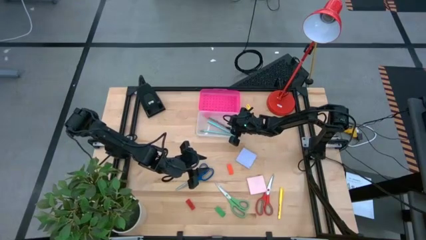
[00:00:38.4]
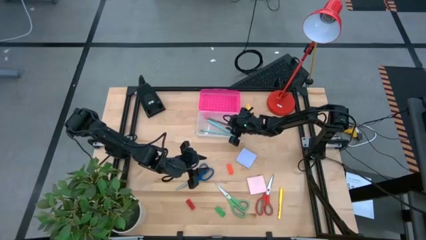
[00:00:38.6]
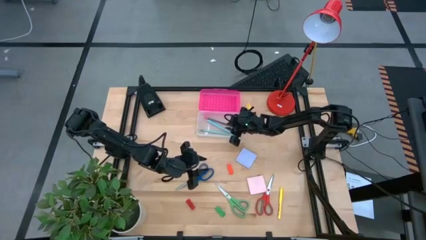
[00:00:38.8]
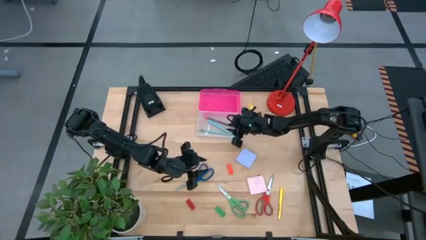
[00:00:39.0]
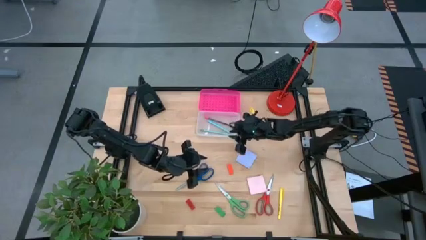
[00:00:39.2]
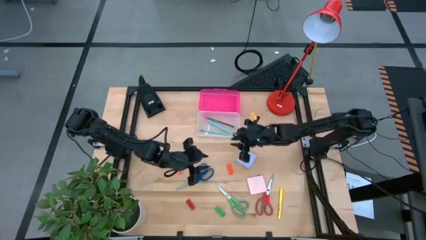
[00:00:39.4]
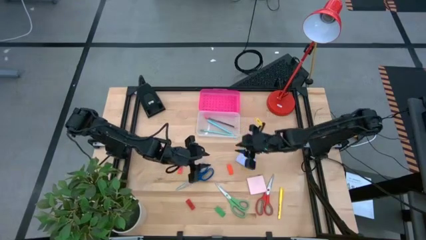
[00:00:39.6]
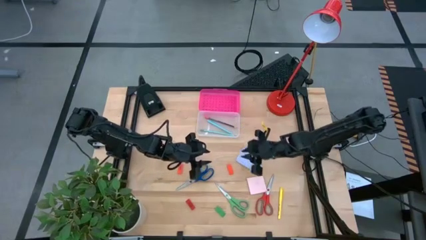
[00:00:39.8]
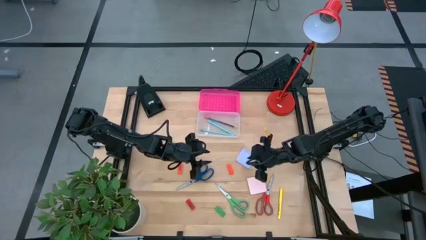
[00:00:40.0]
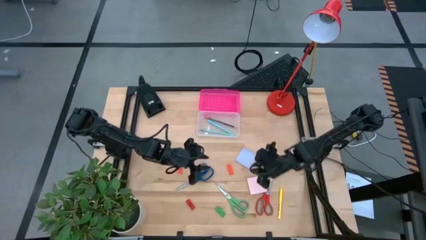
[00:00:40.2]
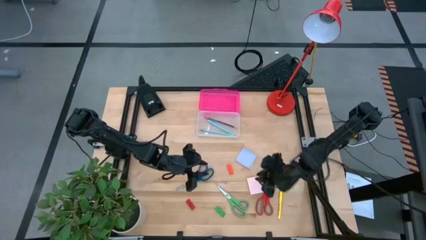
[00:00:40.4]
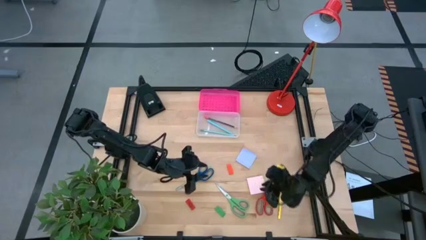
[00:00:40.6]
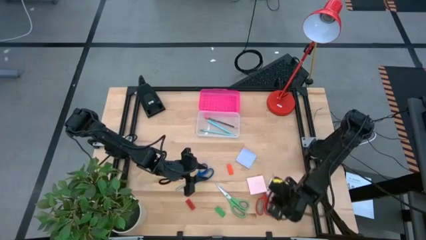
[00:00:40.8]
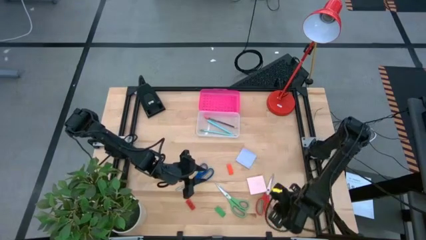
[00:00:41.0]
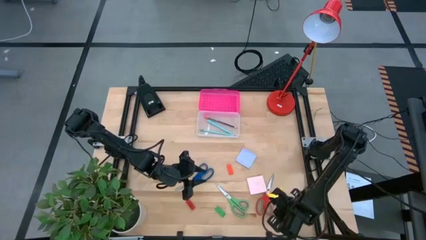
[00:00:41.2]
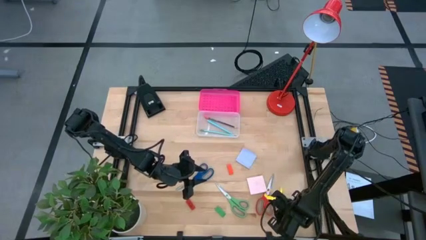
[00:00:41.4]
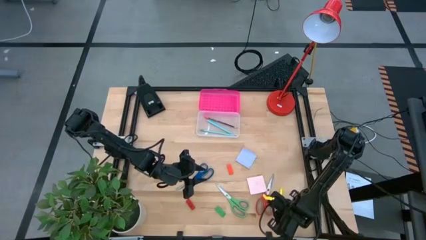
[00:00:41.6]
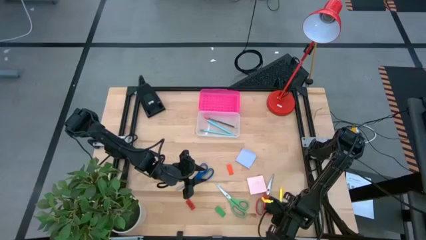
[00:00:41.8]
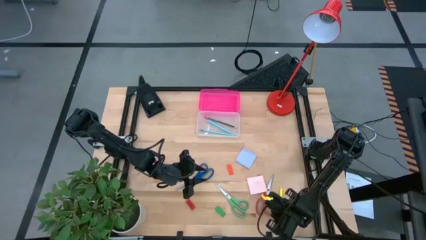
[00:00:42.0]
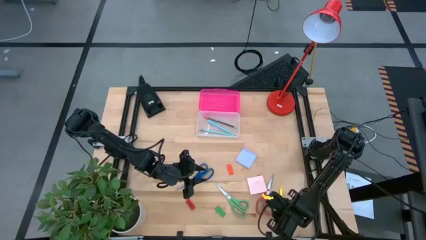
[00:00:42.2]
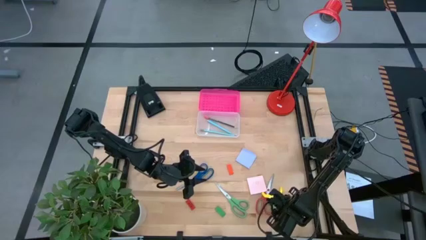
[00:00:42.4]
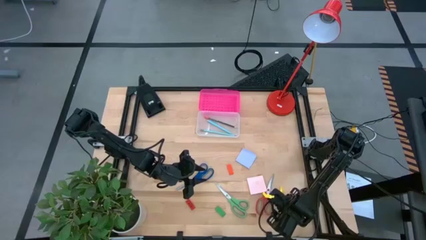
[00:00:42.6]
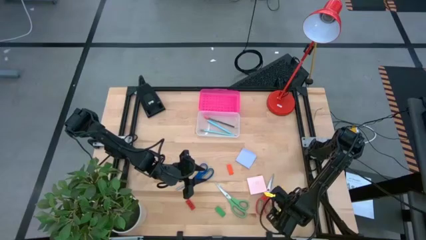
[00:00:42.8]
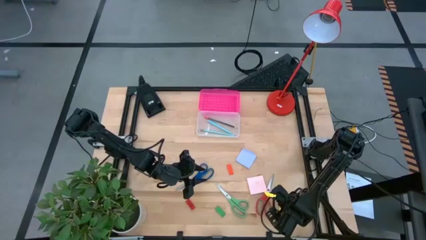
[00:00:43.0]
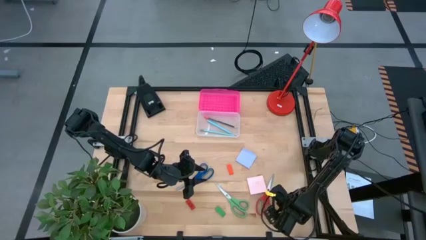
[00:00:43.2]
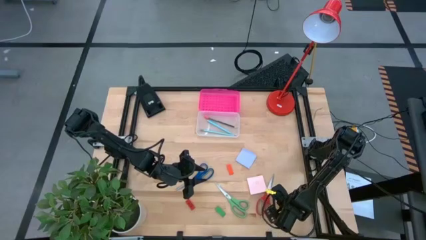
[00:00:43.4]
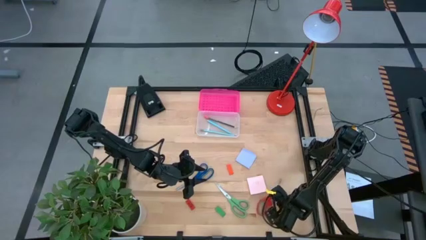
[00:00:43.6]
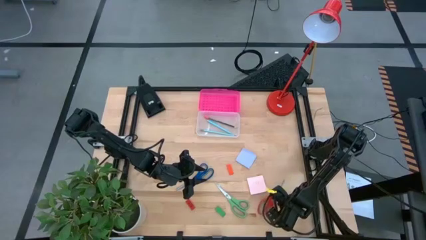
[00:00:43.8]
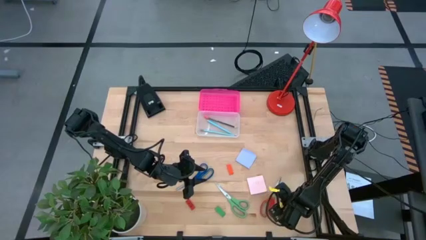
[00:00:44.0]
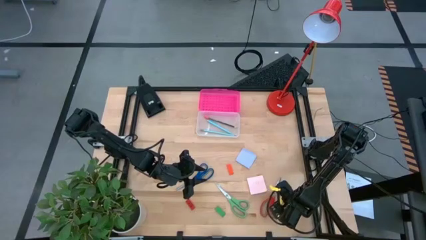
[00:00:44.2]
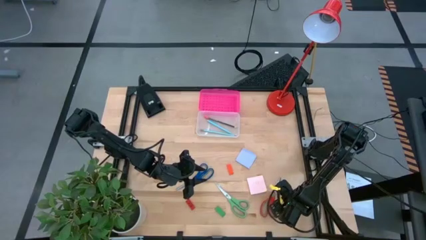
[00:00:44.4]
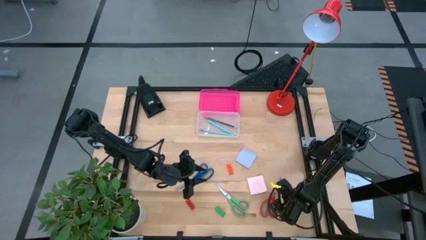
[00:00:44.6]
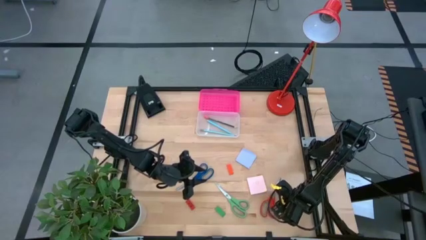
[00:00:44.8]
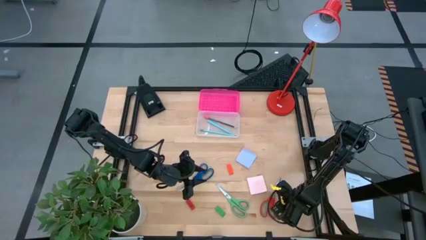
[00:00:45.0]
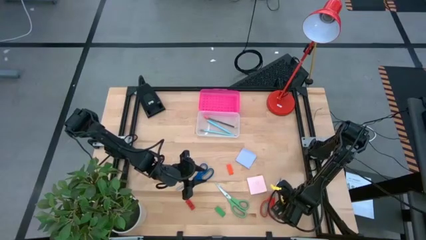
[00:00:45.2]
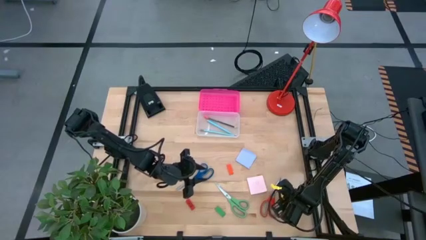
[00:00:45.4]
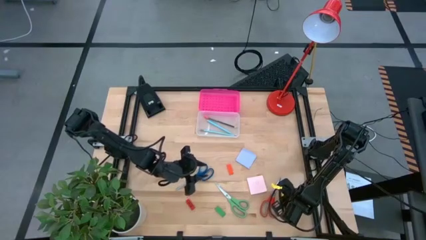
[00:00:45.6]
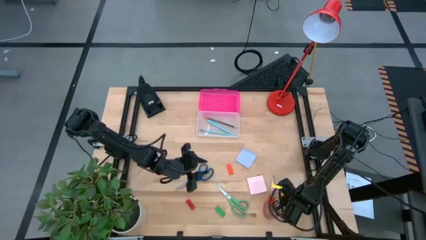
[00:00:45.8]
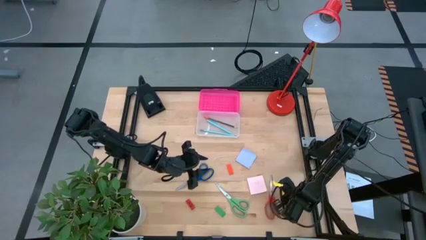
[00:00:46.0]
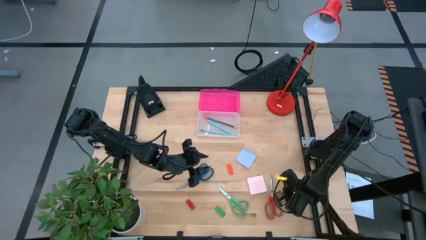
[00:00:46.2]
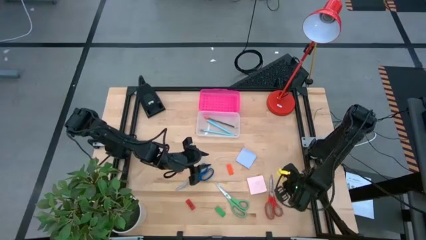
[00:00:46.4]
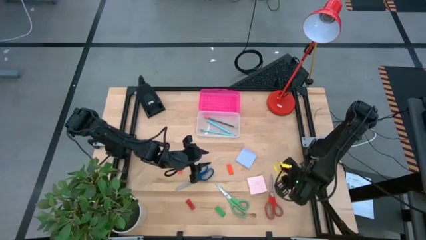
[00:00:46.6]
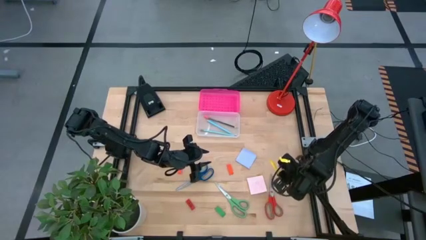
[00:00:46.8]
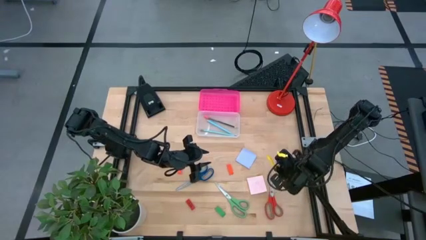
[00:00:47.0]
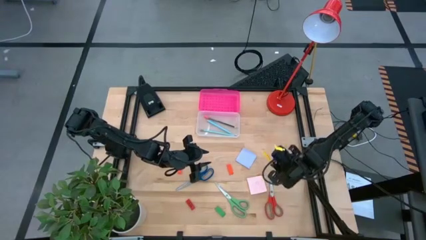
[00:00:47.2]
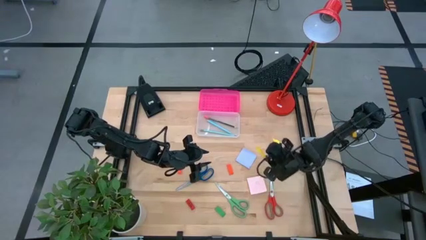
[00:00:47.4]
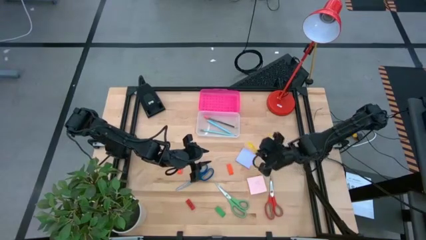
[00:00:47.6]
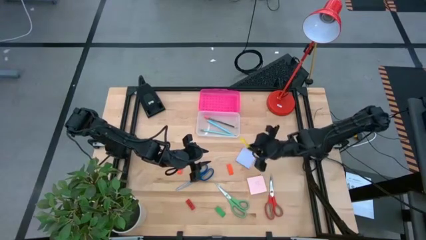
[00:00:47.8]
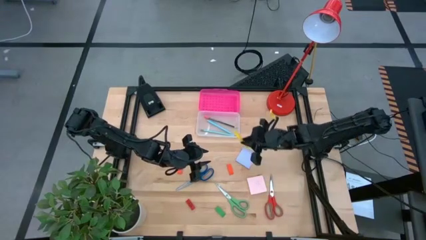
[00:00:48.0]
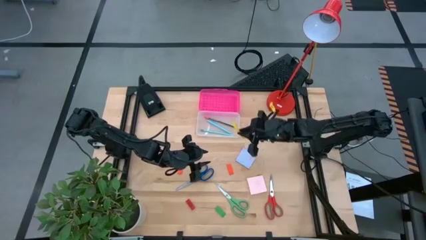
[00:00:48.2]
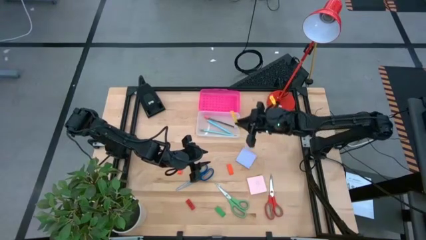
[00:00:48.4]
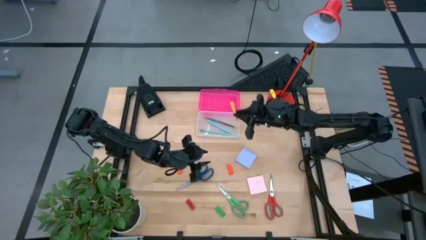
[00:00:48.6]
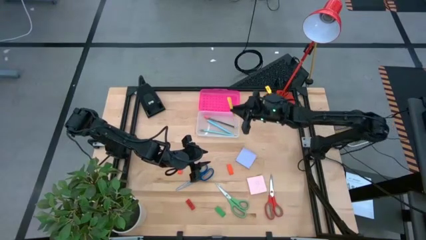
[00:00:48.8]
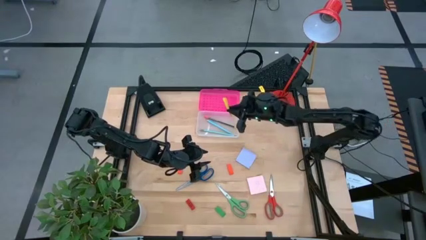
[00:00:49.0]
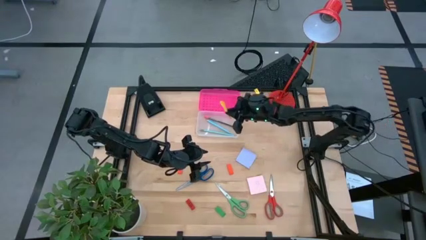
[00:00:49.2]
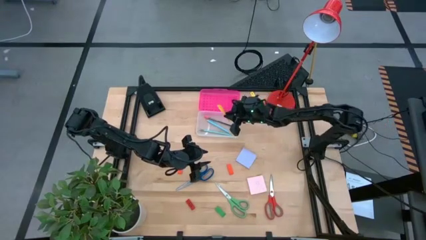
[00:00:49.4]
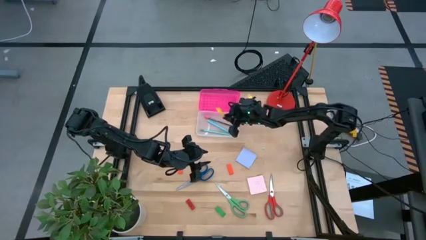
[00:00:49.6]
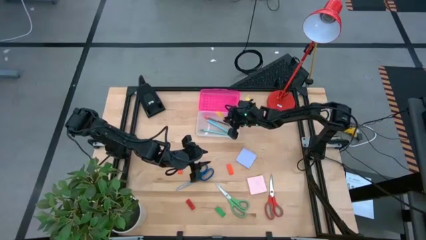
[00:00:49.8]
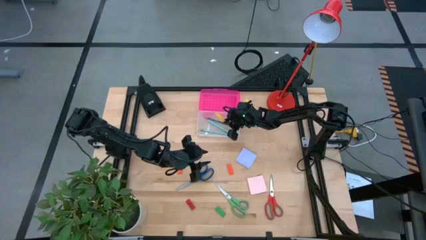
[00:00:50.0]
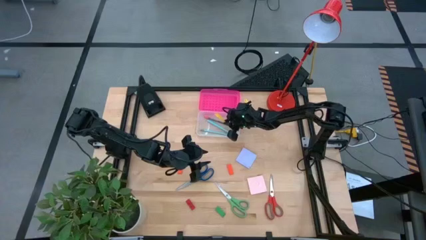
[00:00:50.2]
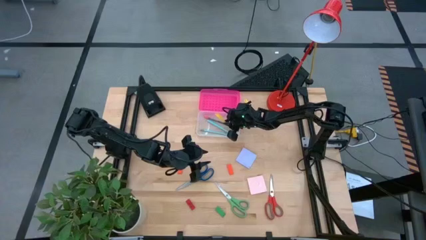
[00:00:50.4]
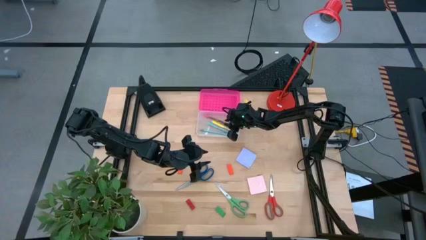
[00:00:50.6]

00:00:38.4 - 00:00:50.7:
Task: Pack school essentials
Put the yellow pen into the supply box

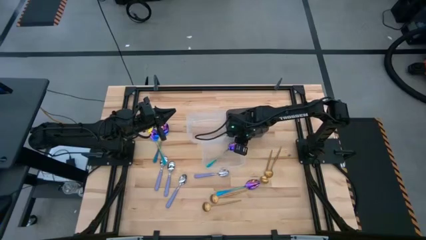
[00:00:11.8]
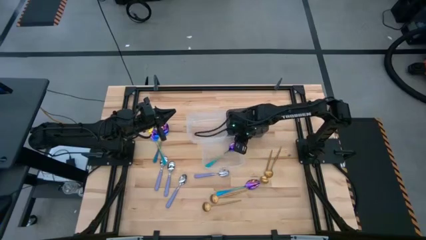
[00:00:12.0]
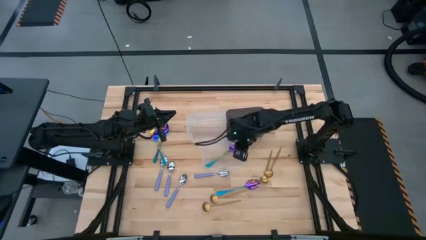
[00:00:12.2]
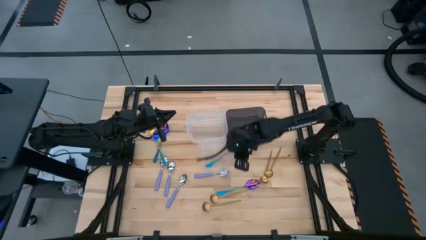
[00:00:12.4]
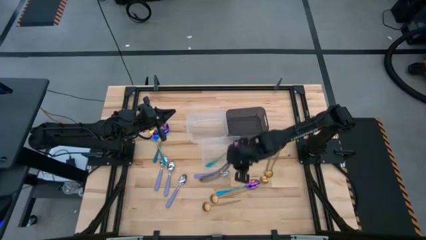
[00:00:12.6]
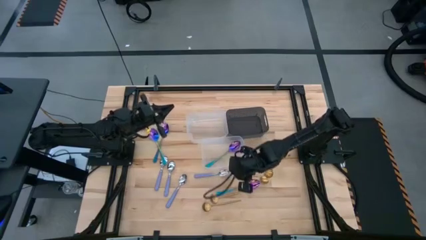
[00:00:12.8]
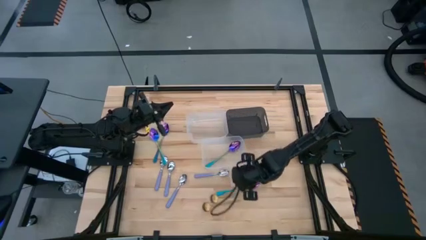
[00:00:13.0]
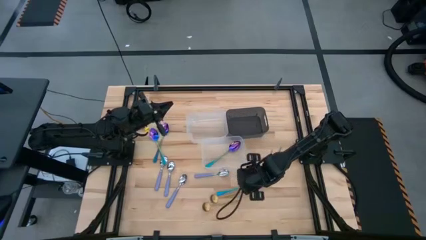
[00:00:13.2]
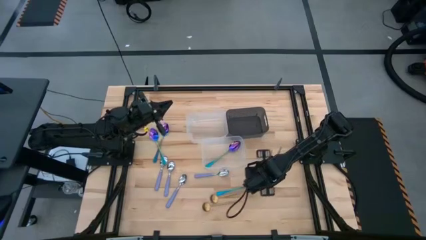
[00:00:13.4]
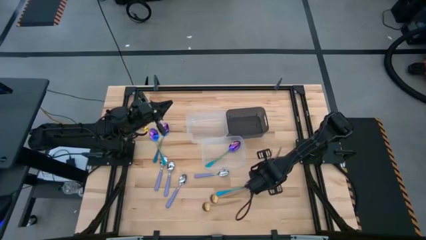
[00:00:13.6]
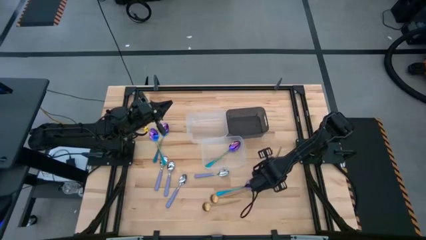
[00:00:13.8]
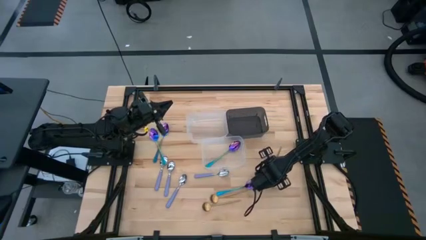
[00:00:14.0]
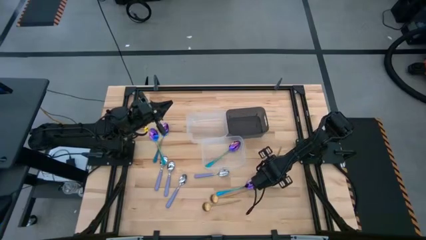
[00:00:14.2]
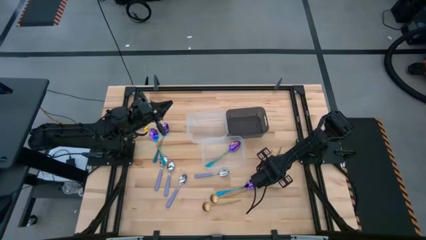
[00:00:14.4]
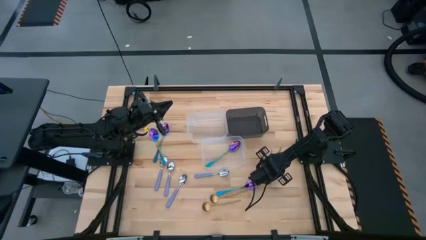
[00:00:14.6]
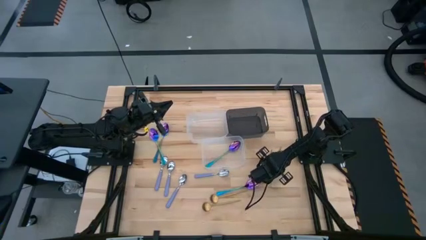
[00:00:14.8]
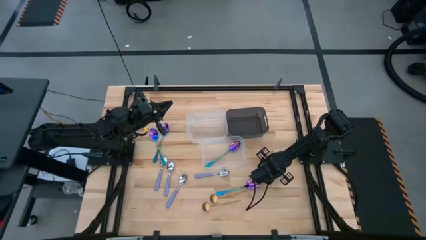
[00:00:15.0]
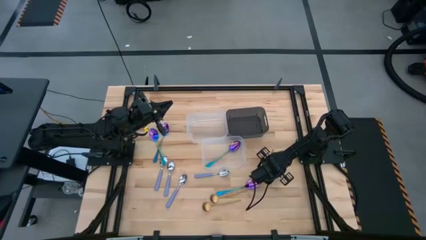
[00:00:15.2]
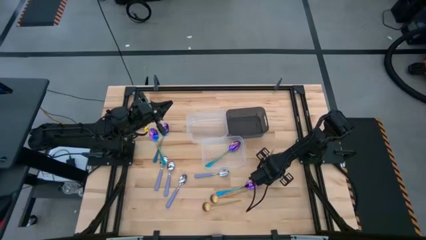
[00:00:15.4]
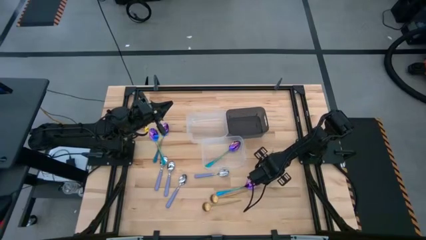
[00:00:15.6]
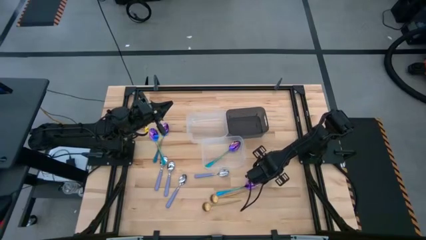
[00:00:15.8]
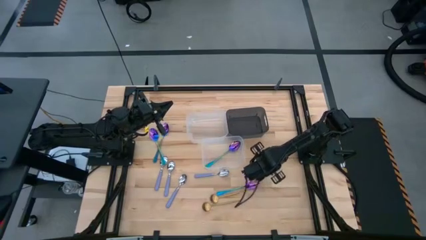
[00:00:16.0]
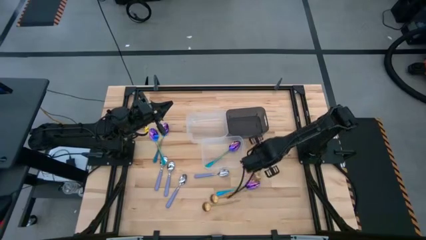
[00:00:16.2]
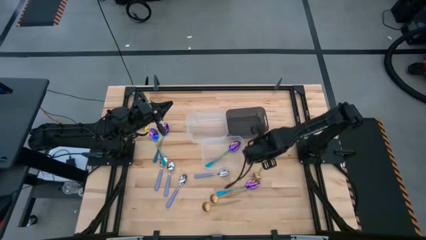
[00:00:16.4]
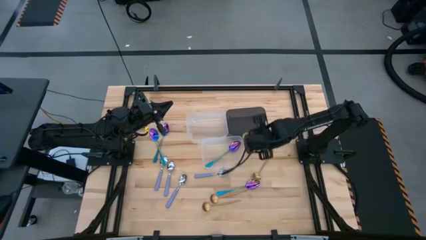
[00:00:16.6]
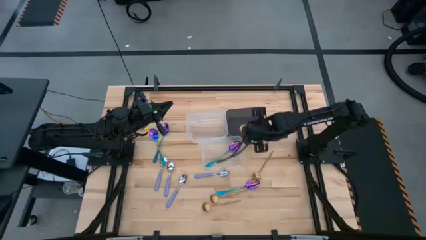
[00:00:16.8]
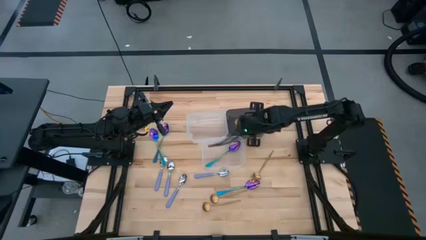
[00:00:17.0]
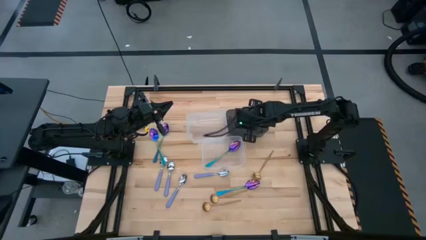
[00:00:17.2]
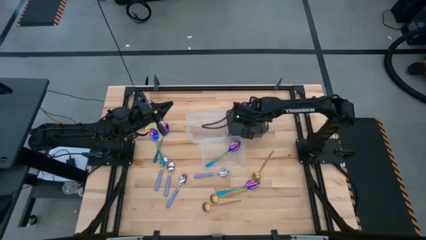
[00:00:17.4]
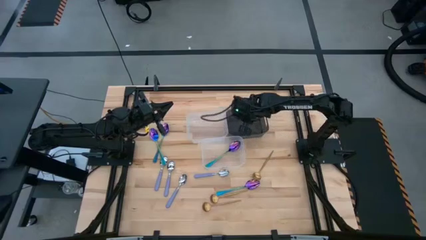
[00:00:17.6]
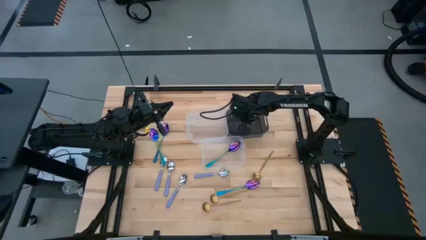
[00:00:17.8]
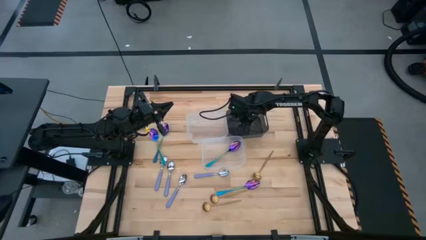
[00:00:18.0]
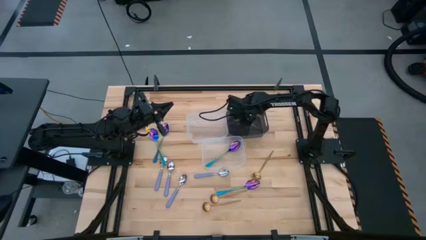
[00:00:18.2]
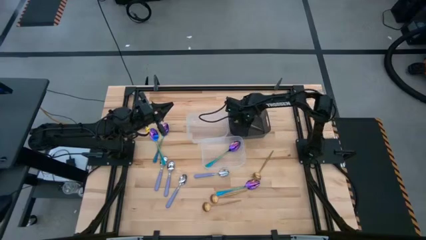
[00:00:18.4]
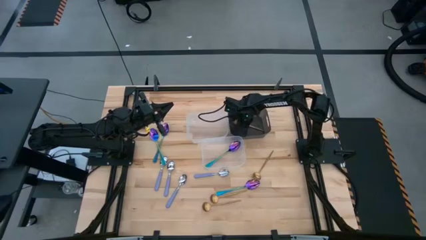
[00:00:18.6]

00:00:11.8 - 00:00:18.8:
Task: Sort silverware by color (type)
Put the gold spoon into the black bin
